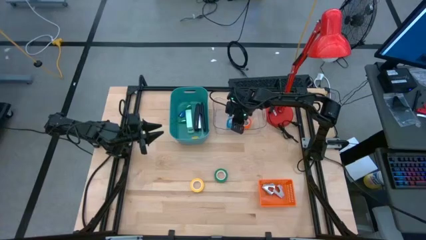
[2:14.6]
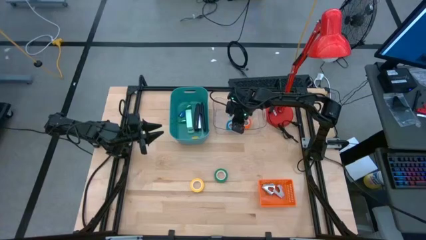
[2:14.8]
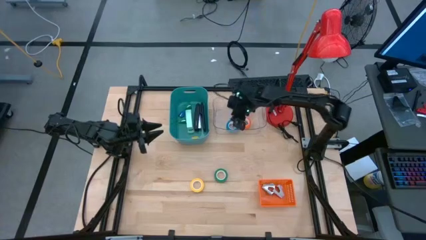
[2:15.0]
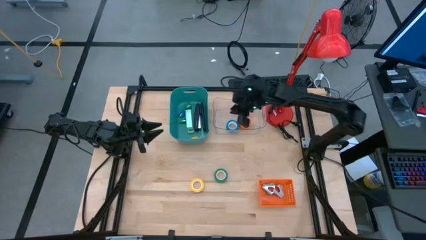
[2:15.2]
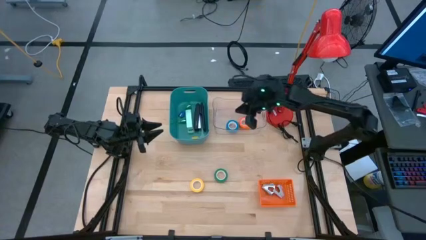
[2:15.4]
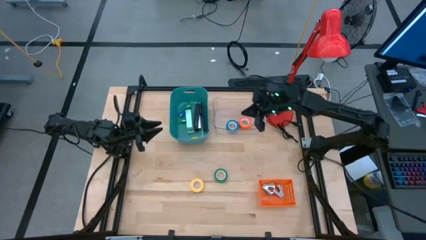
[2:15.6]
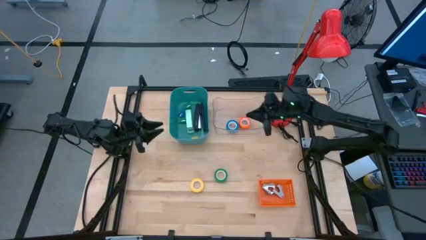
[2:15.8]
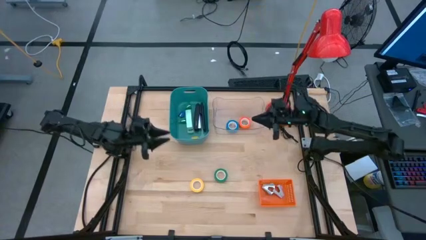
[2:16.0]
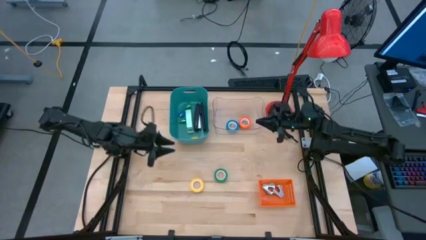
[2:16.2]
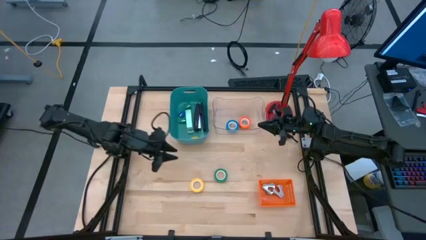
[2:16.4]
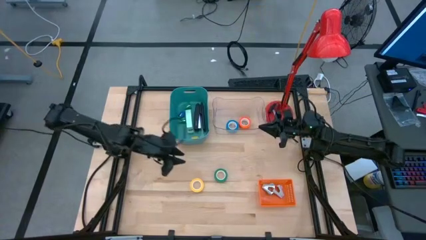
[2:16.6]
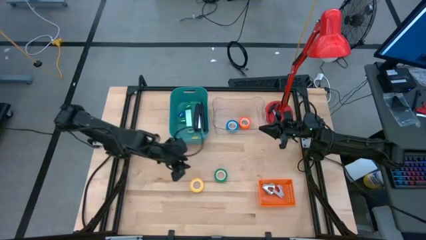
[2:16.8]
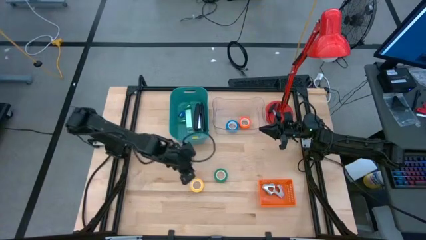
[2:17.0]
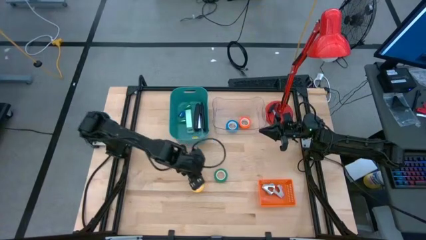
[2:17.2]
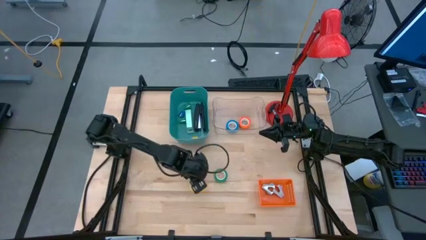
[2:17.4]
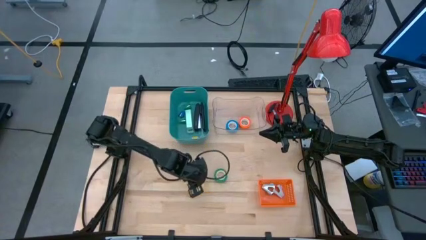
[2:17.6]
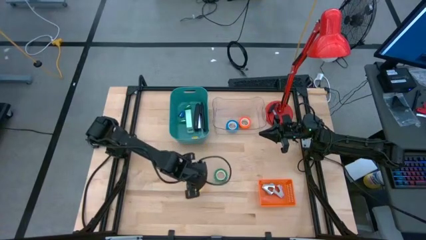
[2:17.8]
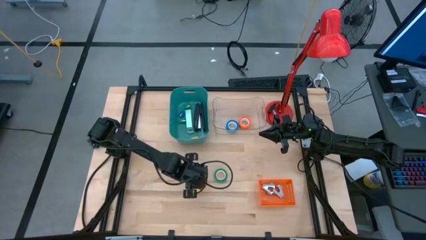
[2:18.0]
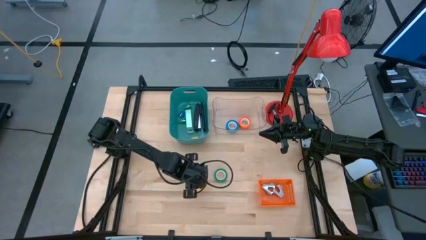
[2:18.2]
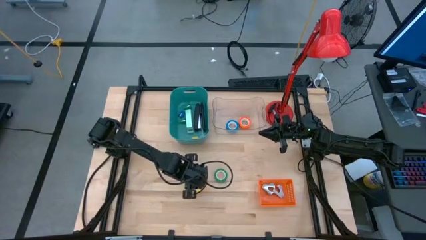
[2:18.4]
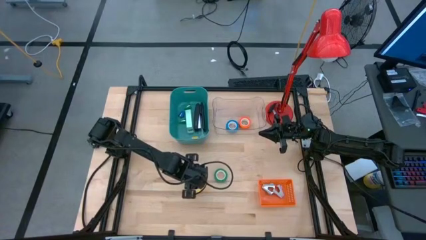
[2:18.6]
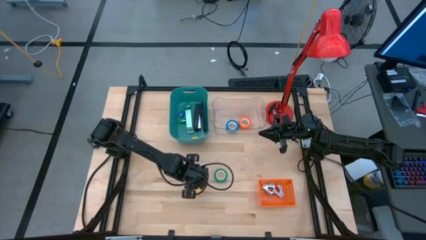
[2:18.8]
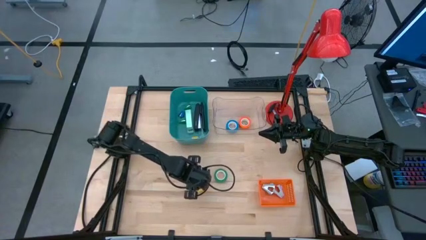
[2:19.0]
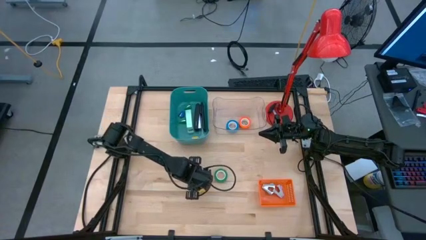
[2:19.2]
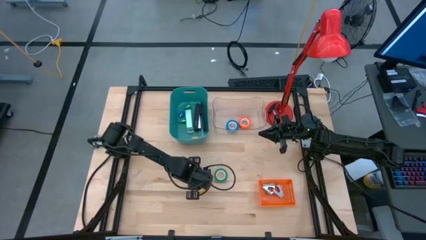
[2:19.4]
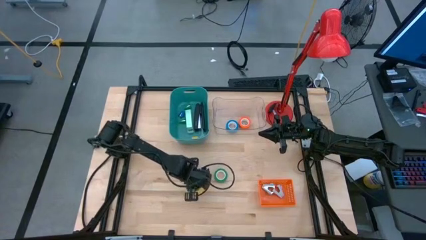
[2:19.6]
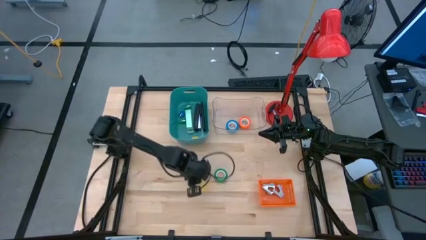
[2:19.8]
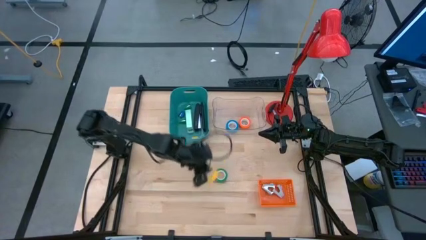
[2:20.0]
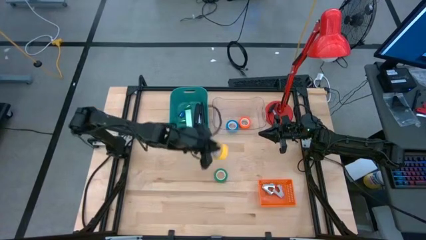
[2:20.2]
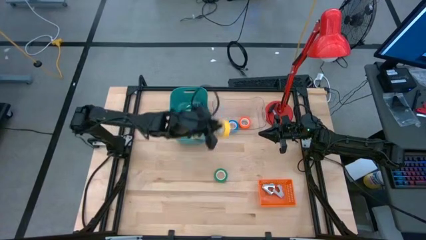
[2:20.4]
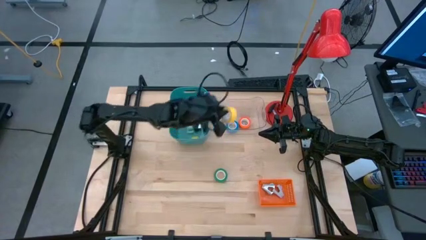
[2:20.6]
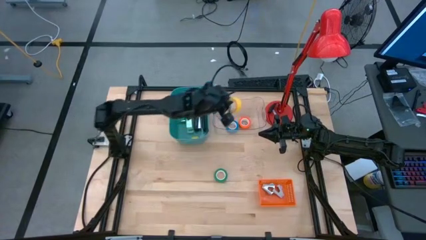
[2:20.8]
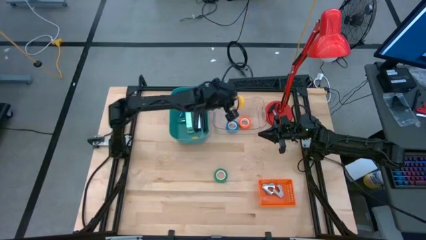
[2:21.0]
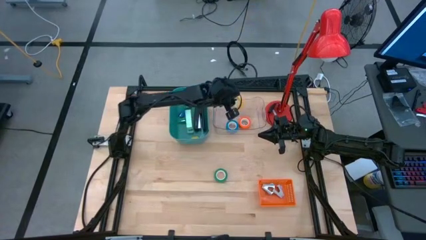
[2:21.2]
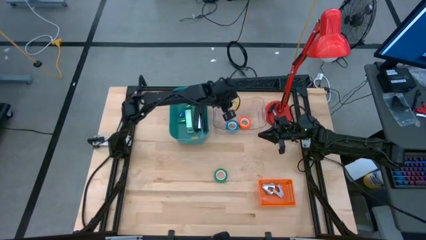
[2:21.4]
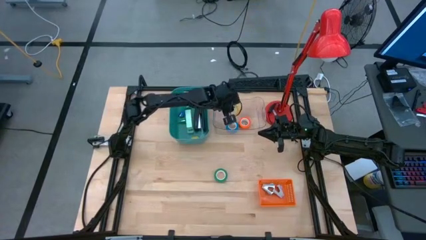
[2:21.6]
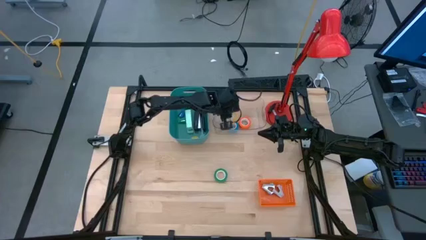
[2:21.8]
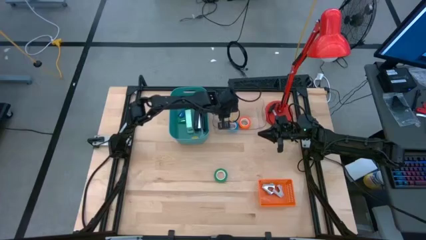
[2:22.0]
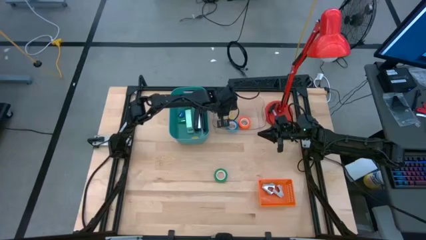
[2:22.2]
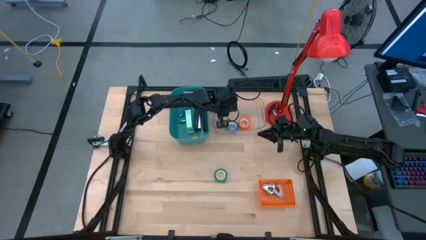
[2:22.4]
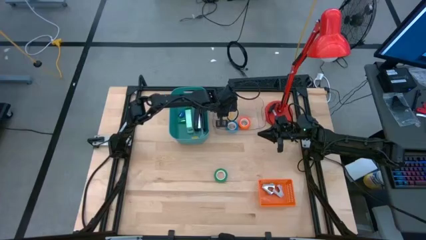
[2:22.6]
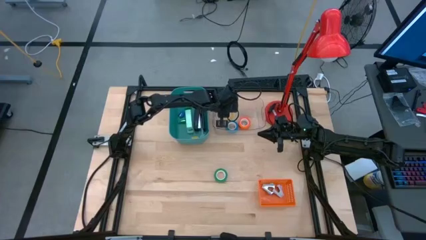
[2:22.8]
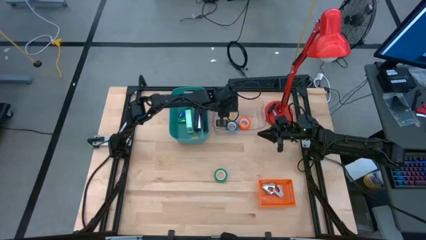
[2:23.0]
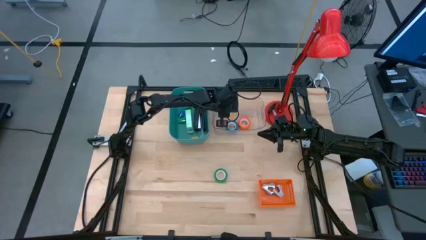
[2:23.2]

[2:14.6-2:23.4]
Task: Pick and place Stapler, Stapler remover, tape
Put the yellow tape into the transparent bin

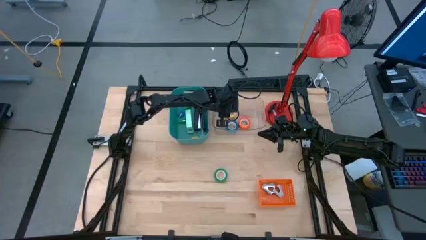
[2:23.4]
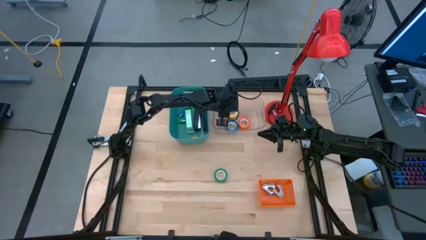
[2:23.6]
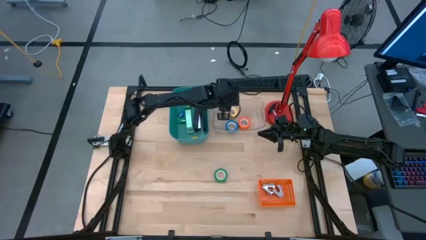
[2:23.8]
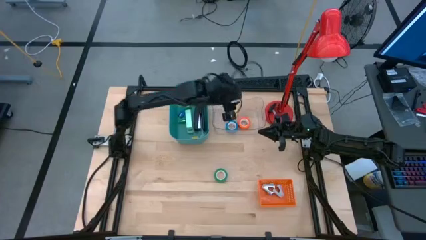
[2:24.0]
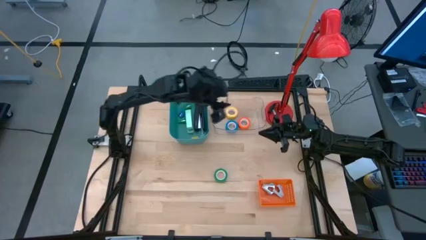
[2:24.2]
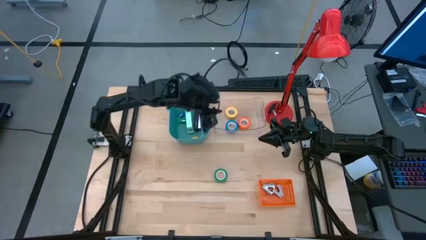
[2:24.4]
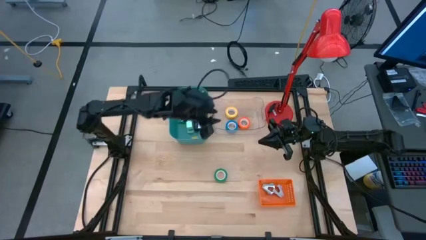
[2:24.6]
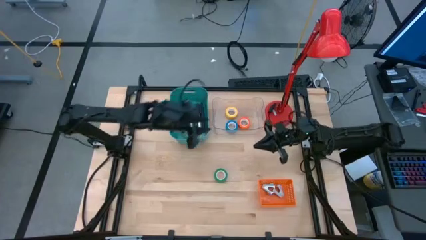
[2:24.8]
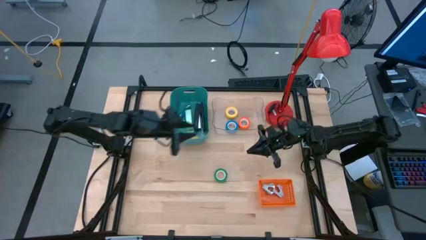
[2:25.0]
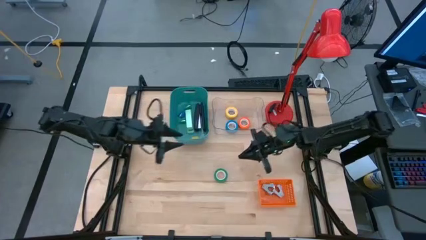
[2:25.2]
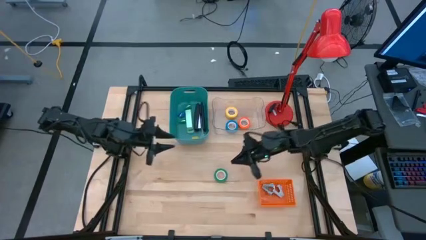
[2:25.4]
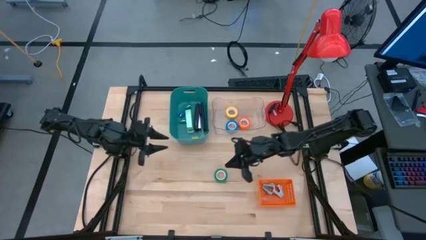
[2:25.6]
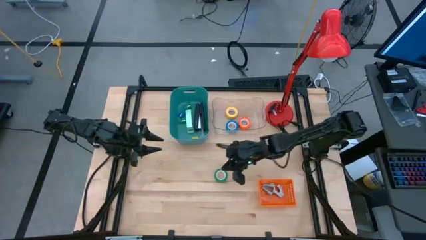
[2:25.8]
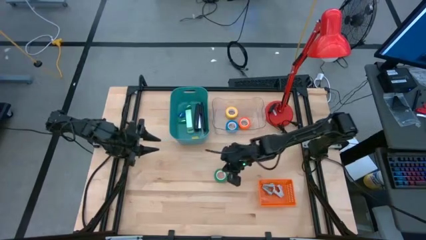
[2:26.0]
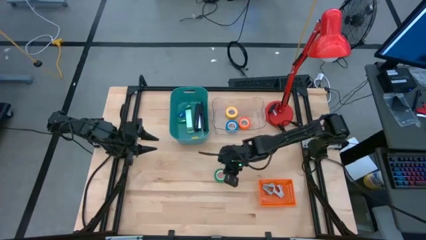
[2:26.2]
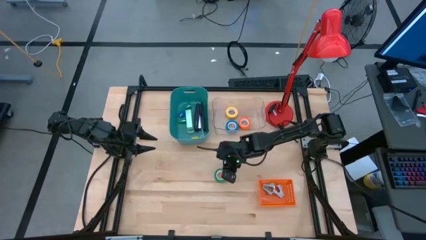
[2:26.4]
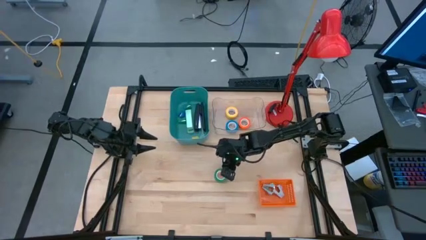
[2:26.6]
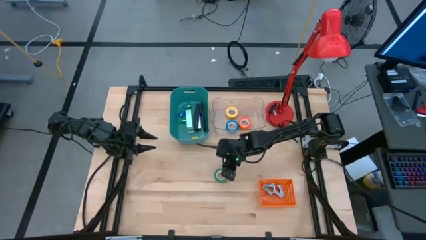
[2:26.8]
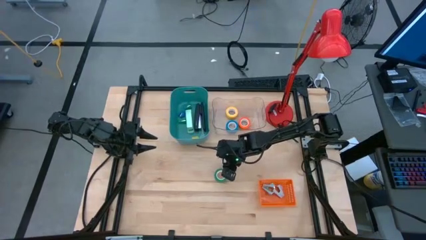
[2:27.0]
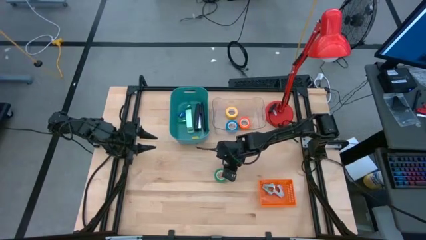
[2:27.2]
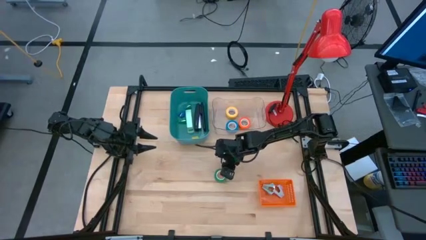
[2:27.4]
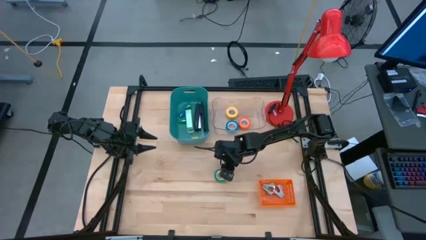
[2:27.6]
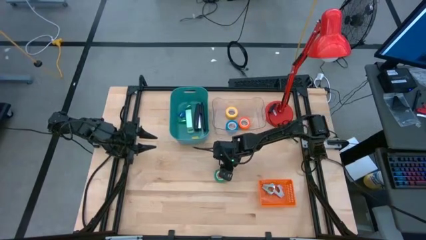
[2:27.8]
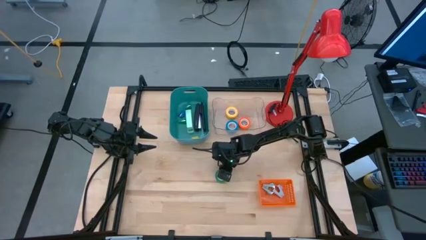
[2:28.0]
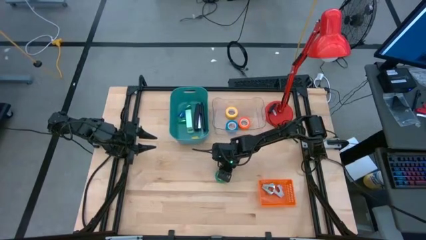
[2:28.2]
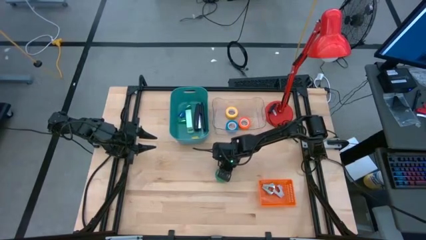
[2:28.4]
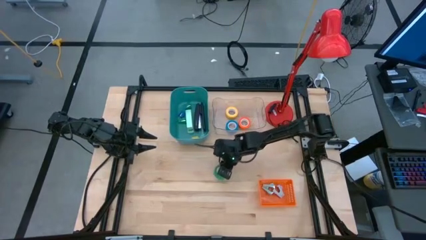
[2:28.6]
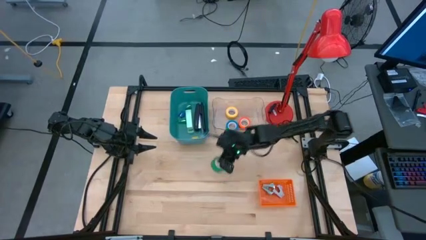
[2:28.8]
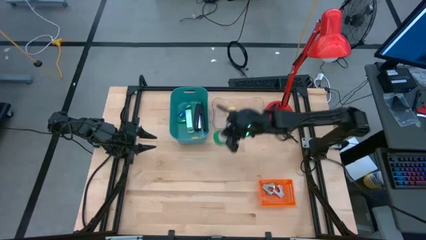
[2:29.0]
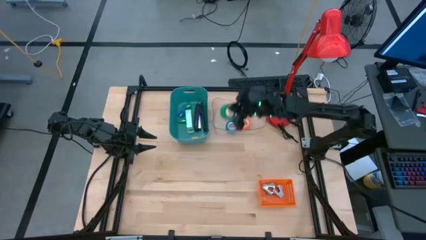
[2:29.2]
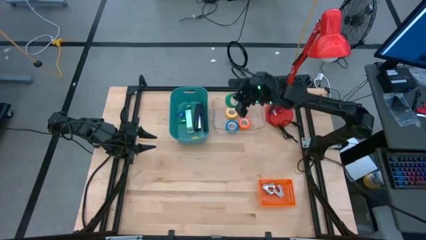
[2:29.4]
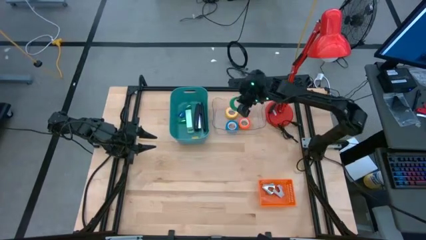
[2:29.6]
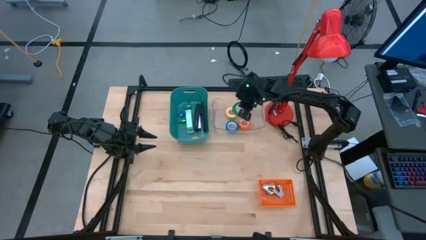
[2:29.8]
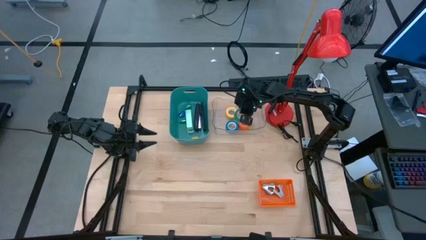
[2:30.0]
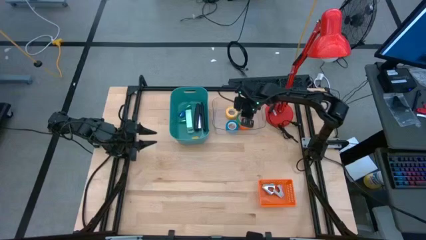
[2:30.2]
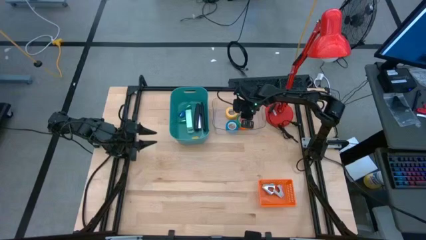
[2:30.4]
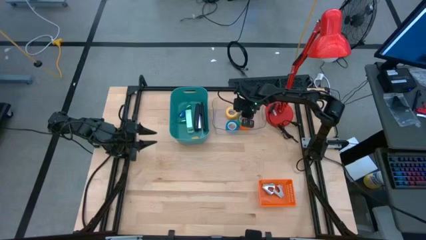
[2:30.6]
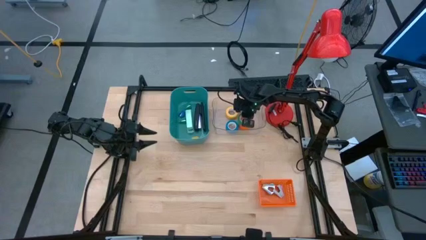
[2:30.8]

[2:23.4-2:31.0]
Put the green tape into the transparent bin
